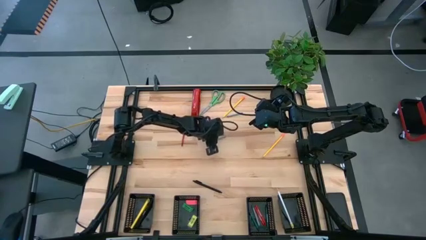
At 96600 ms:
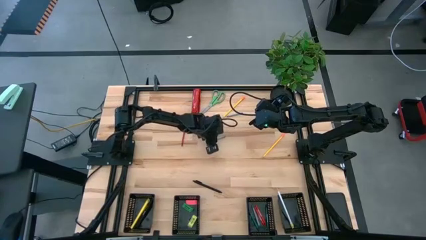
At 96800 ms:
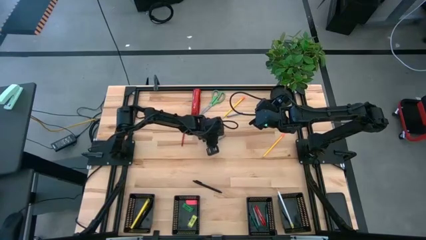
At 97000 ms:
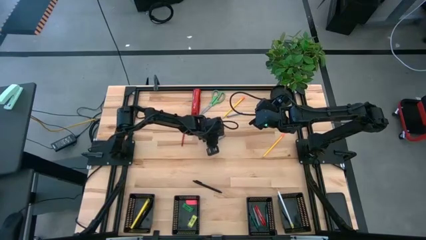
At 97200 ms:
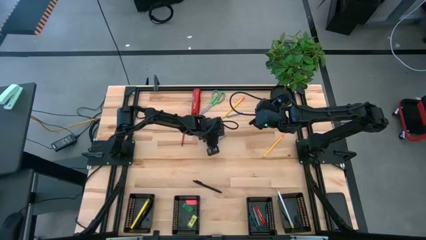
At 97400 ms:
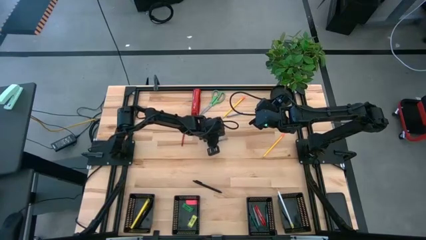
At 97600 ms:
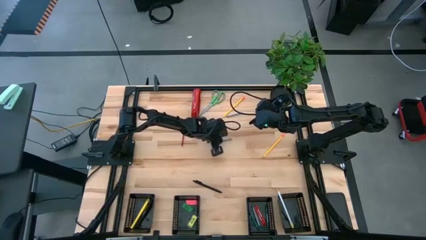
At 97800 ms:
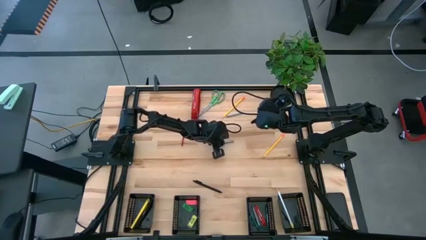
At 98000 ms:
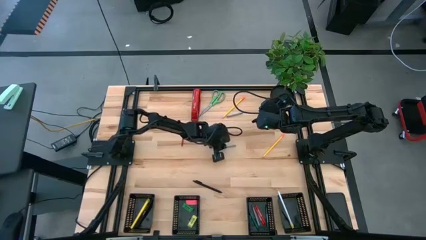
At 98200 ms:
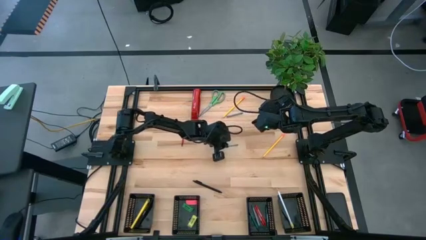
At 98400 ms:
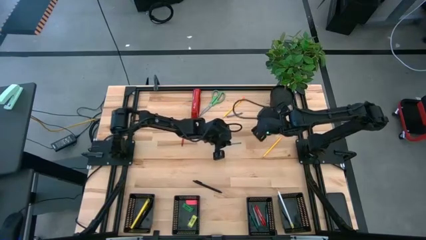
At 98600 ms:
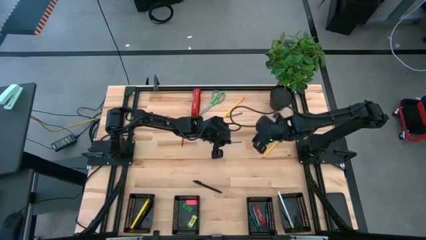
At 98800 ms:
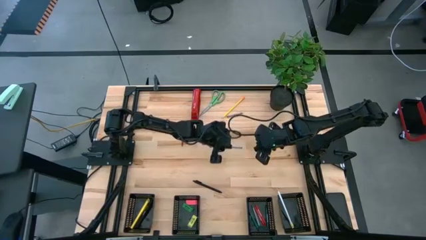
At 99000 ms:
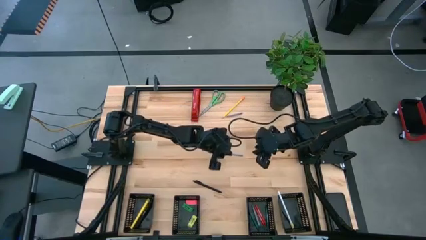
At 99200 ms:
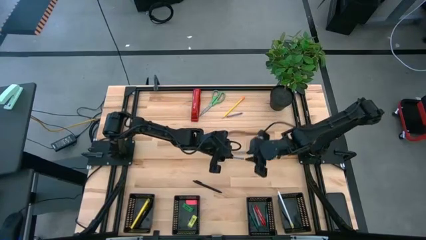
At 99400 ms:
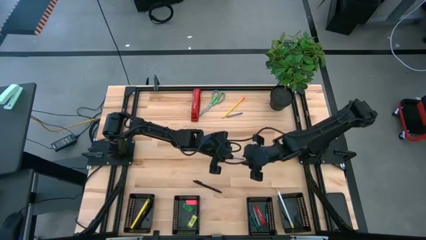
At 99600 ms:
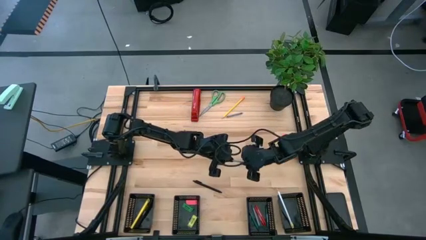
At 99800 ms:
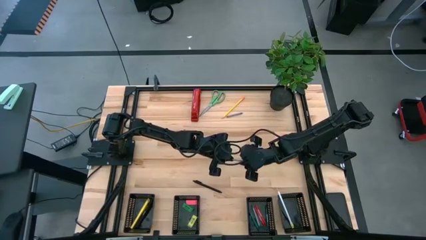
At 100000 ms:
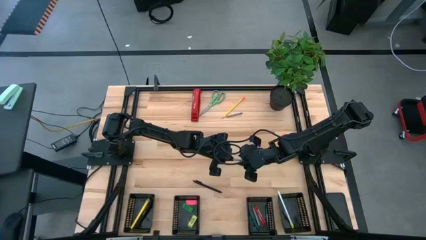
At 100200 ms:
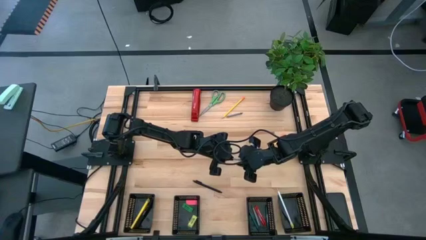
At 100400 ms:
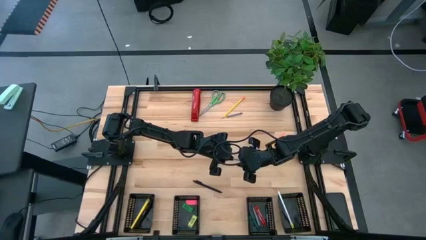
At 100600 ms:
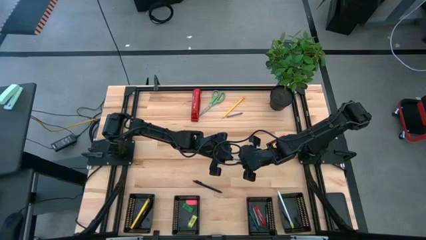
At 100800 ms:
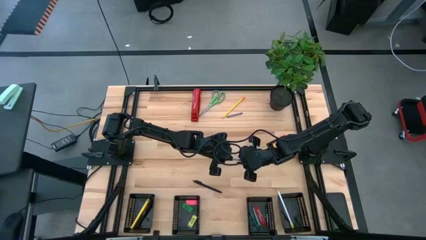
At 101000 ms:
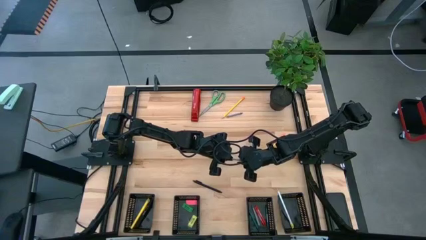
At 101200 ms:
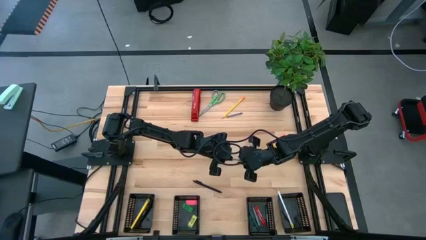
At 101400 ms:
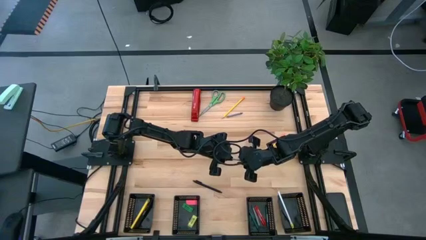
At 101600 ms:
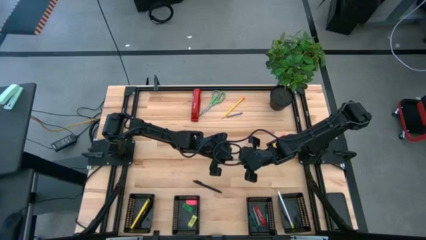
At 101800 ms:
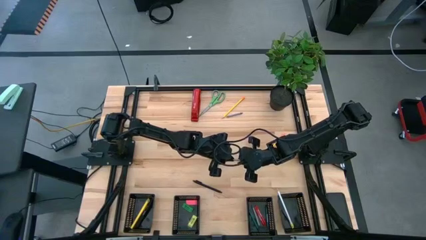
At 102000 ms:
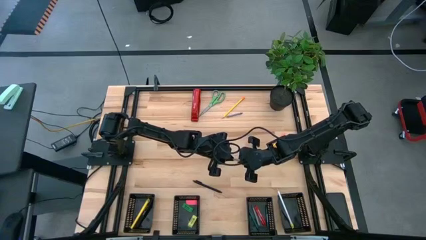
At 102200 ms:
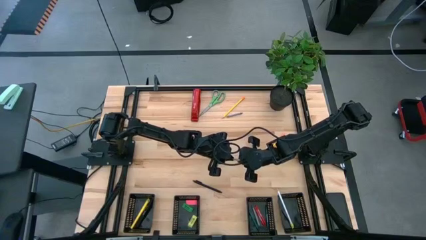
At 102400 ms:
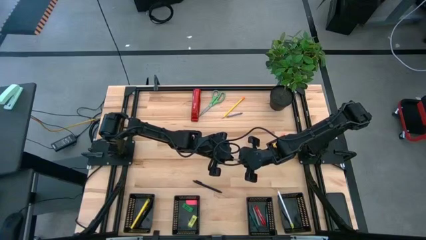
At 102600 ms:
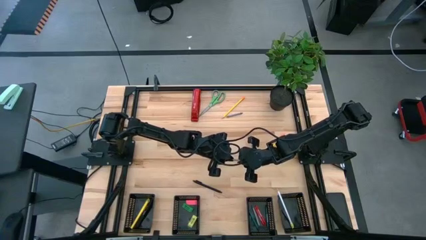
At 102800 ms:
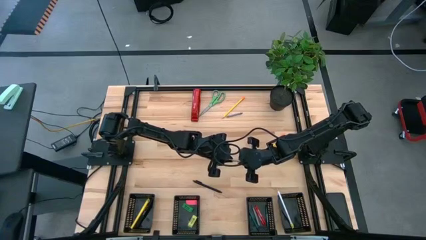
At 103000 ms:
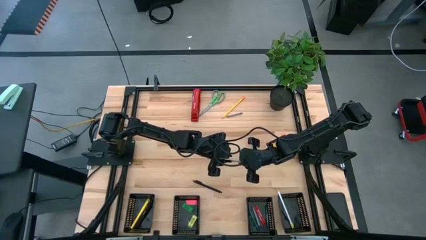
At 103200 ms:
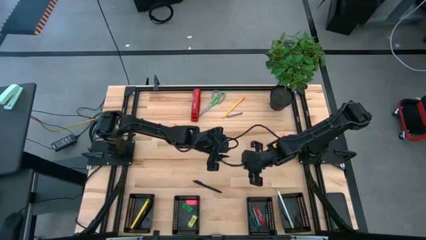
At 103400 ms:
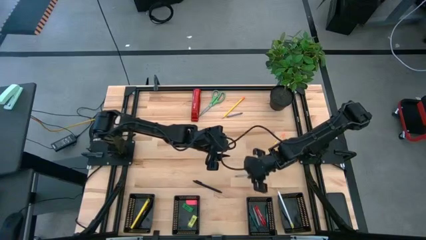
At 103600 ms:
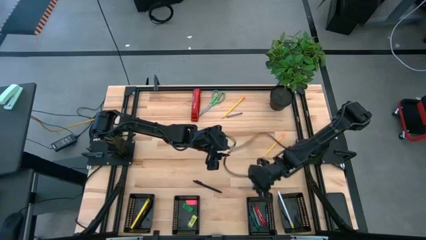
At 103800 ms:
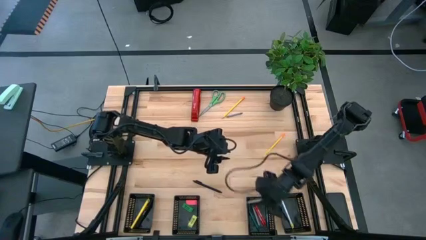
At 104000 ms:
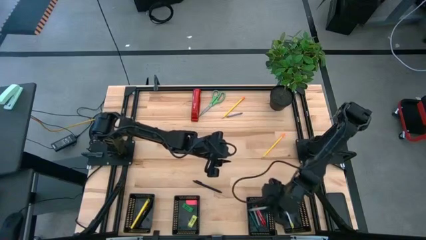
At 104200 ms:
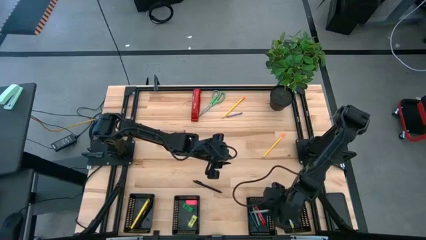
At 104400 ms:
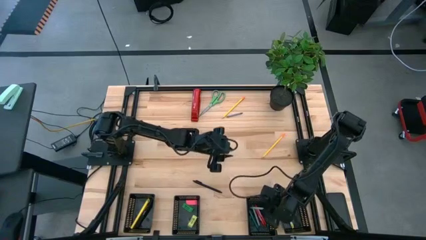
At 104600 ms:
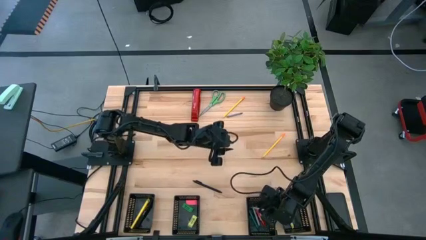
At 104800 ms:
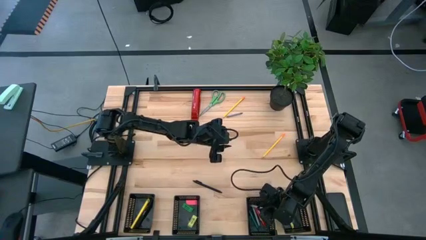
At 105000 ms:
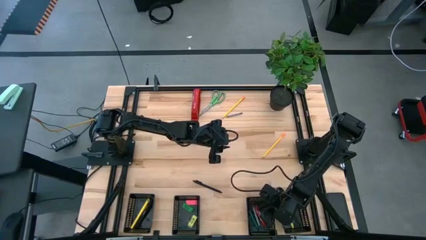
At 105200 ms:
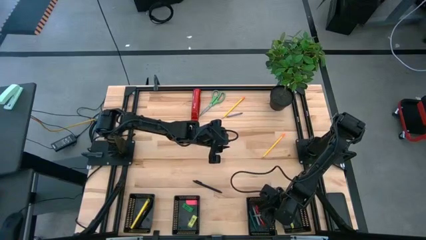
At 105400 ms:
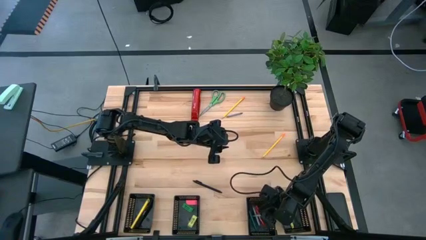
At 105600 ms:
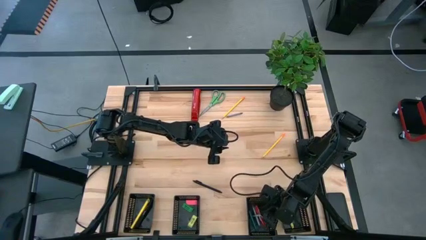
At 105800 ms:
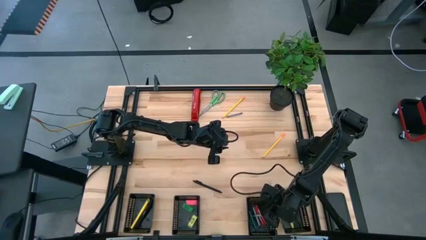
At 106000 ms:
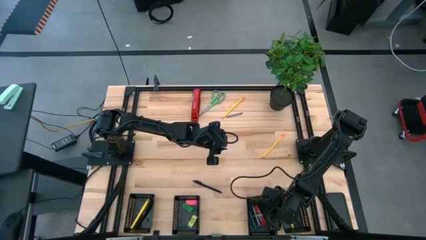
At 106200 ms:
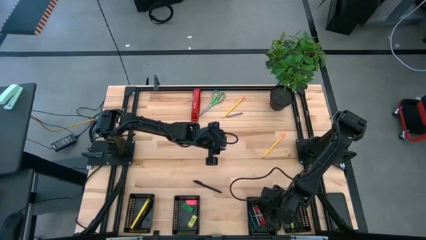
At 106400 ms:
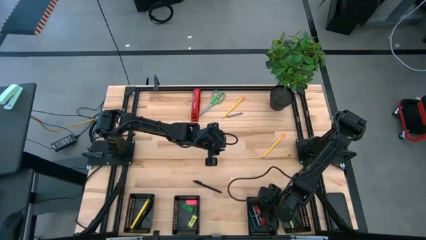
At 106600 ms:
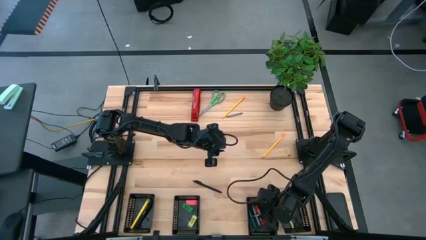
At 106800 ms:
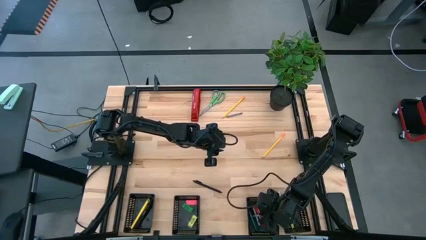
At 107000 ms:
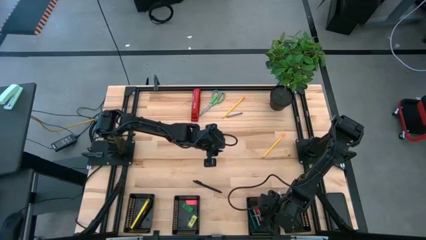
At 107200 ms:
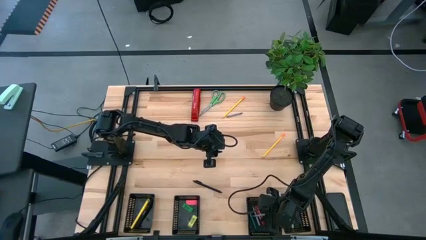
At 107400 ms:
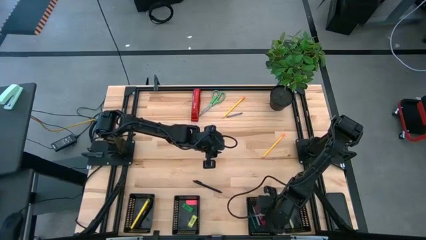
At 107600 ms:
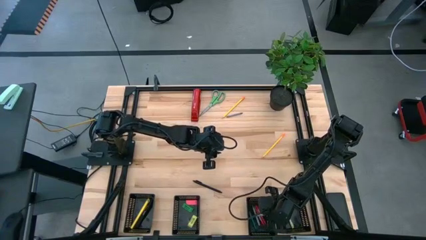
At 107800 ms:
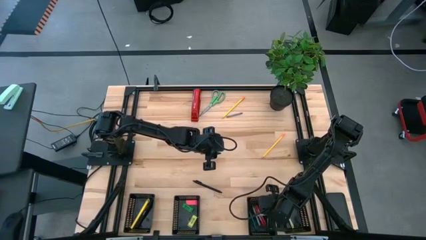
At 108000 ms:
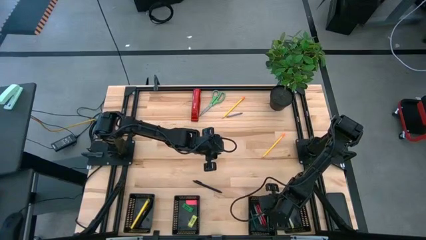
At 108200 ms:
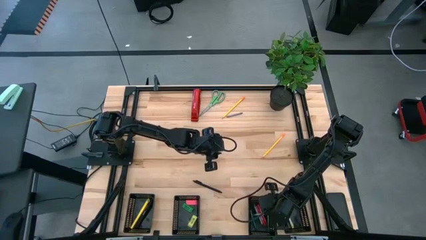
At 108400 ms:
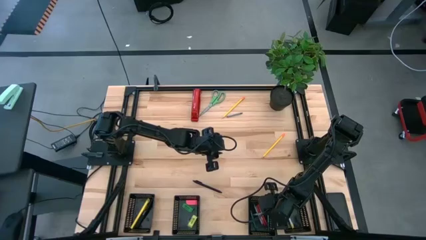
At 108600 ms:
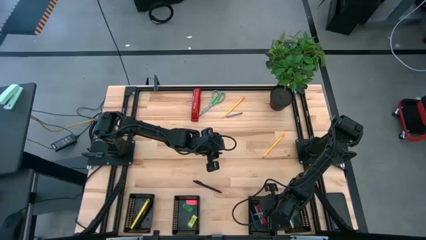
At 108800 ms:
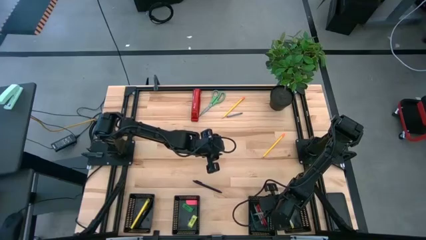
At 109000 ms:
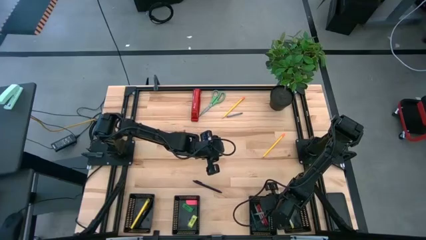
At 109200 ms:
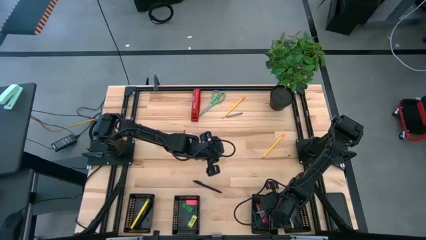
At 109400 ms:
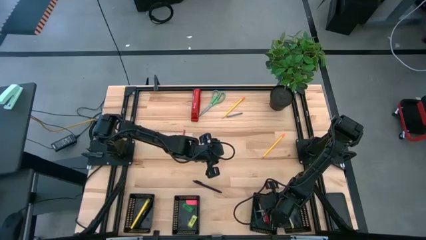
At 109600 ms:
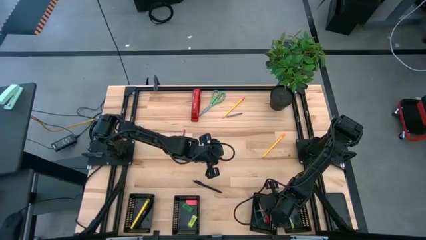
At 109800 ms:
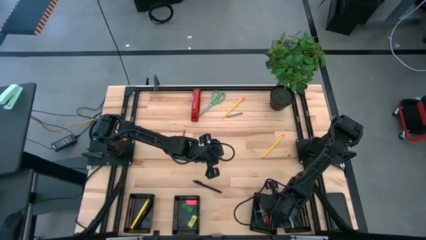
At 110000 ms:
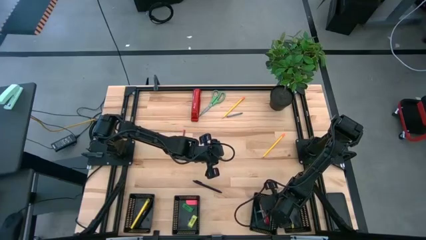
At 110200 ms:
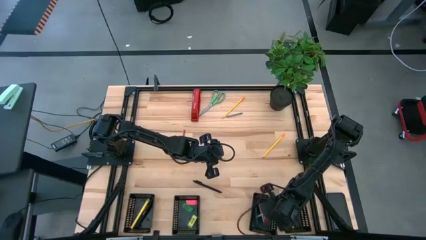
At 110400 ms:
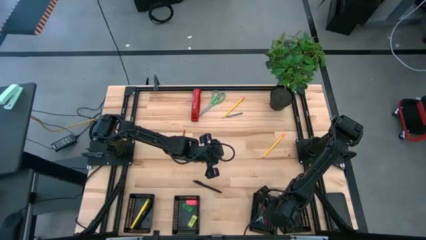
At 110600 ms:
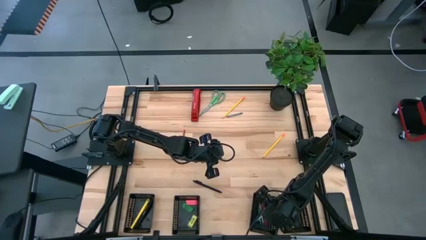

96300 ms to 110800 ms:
Task: Sort crayons/erasers/pens/pencils in bins
Put the left gray crayon into the middle right black bin

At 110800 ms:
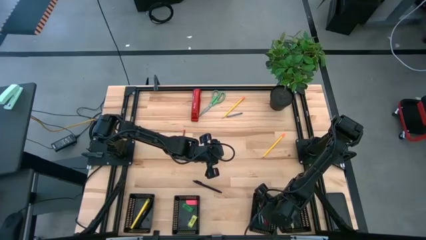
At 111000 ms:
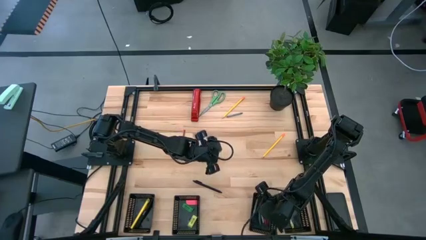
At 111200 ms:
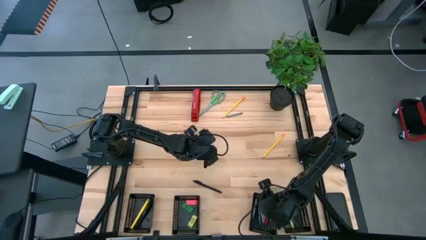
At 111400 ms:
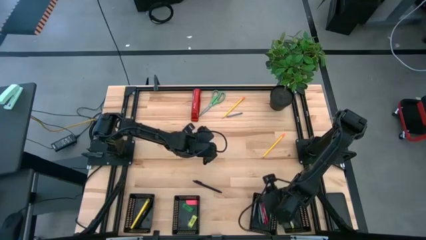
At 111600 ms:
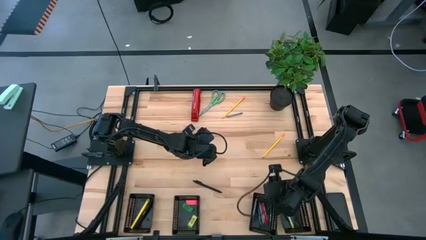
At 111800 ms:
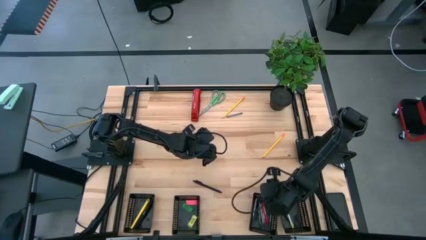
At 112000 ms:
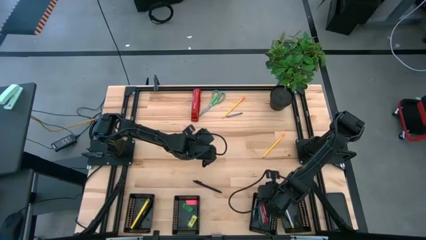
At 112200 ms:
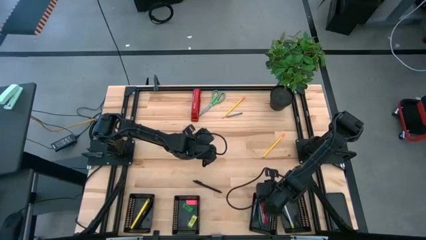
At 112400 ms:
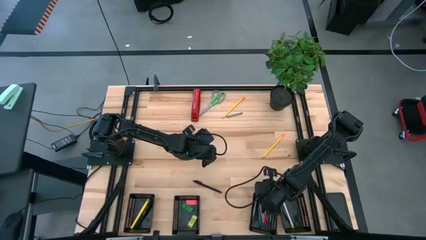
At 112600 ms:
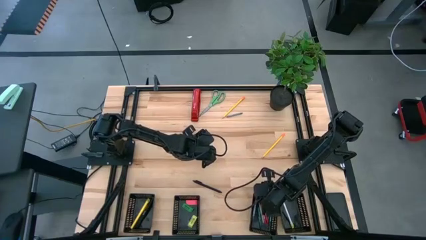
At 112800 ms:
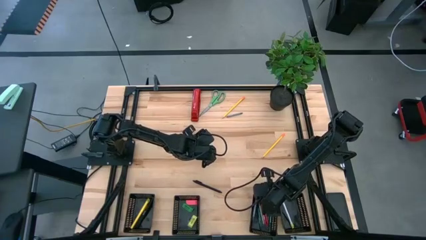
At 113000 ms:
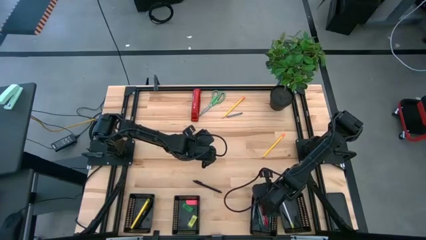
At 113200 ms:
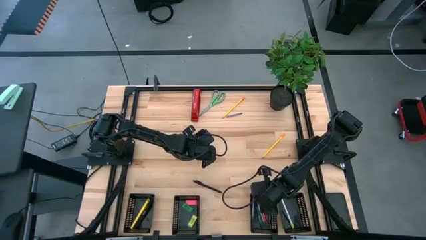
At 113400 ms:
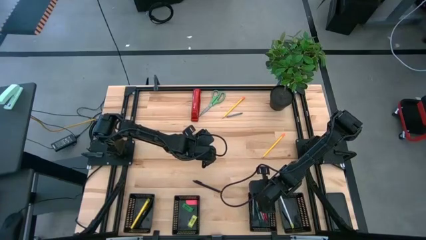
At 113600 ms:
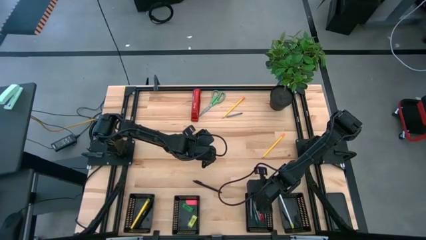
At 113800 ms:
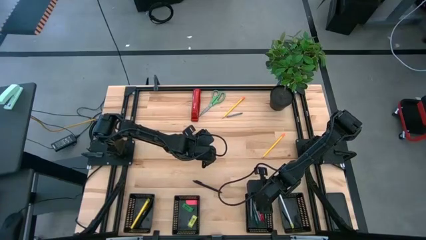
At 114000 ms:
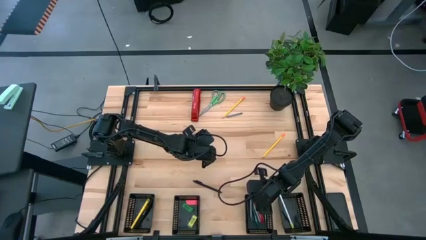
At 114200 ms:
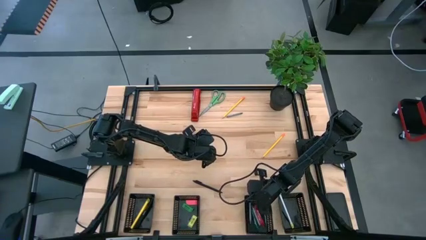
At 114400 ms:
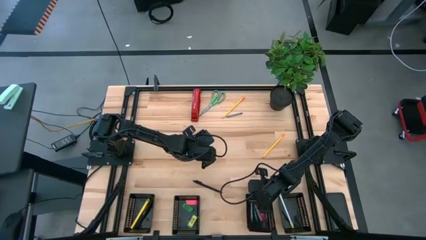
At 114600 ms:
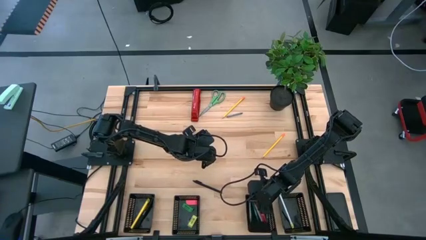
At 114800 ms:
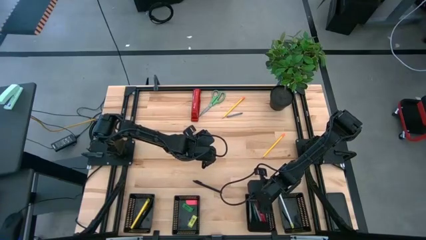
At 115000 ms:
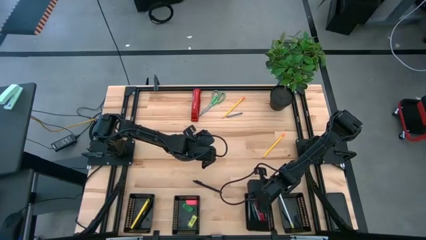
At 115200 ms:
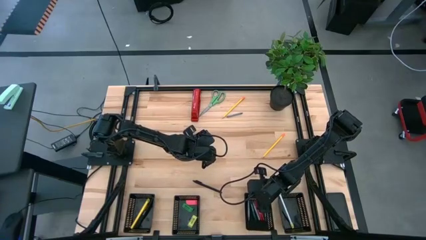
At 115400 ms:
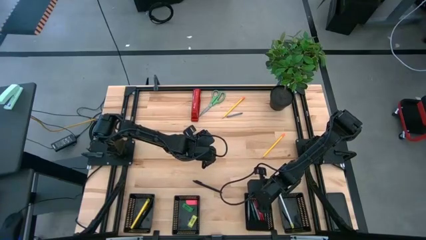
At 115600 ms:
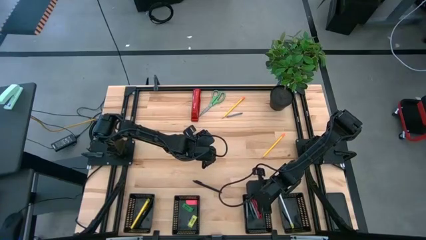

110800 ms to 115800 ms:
Adjust the middle right black bin
